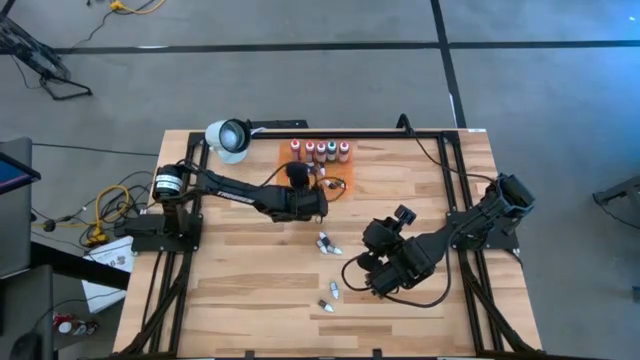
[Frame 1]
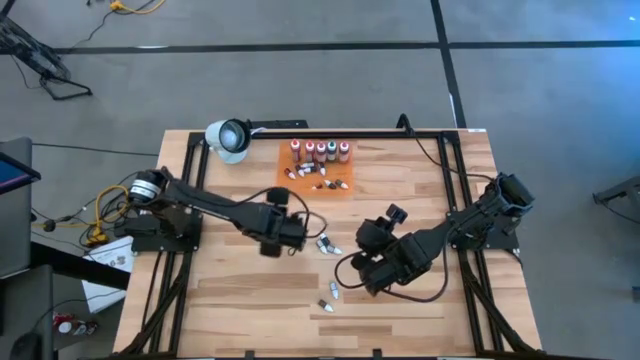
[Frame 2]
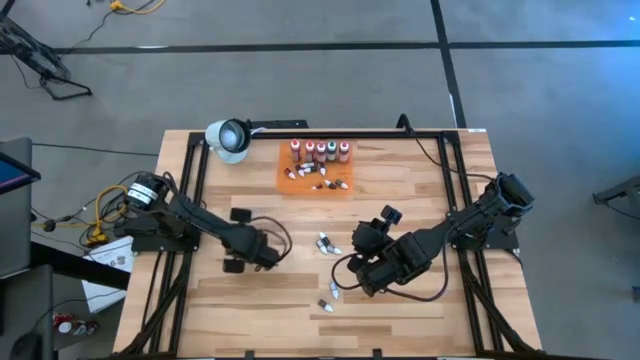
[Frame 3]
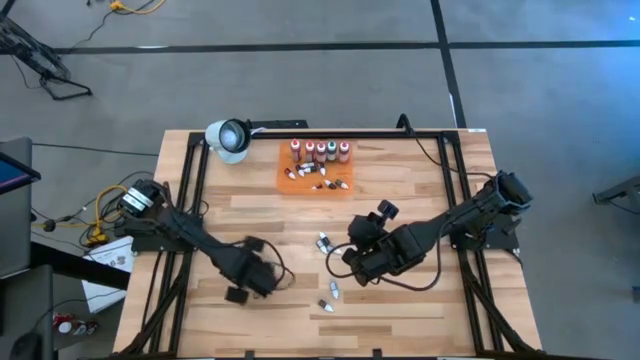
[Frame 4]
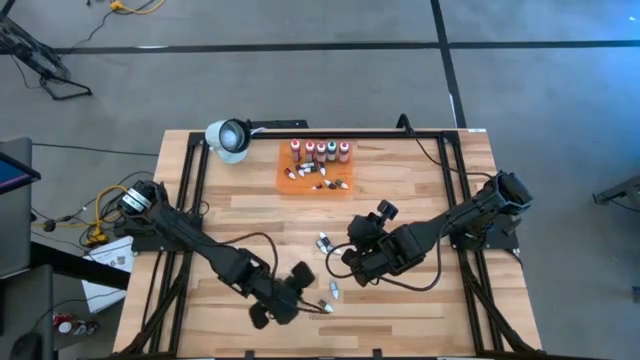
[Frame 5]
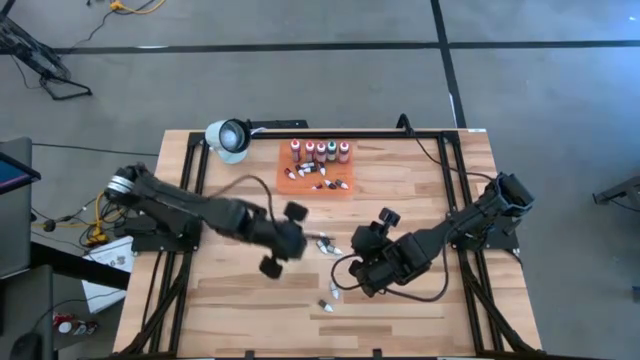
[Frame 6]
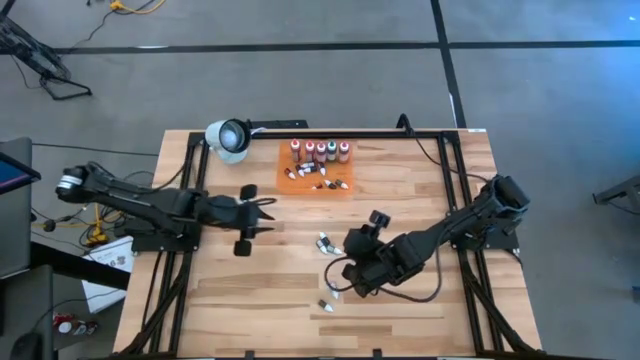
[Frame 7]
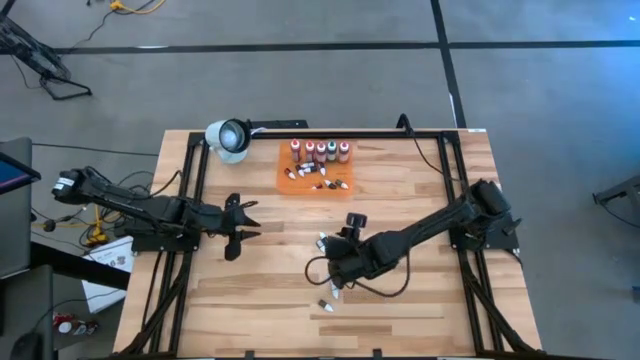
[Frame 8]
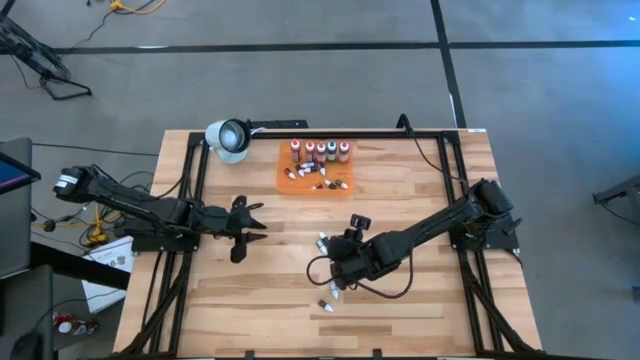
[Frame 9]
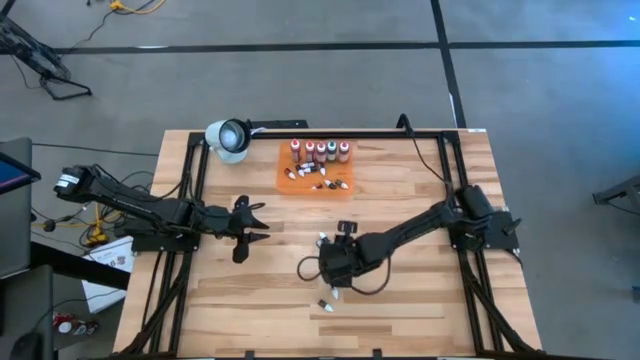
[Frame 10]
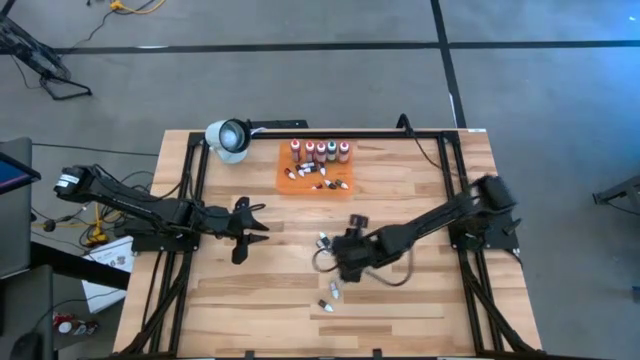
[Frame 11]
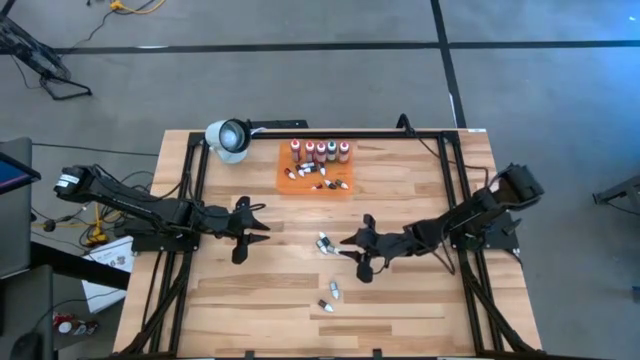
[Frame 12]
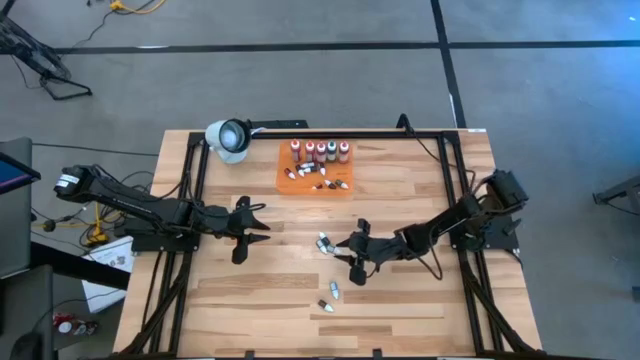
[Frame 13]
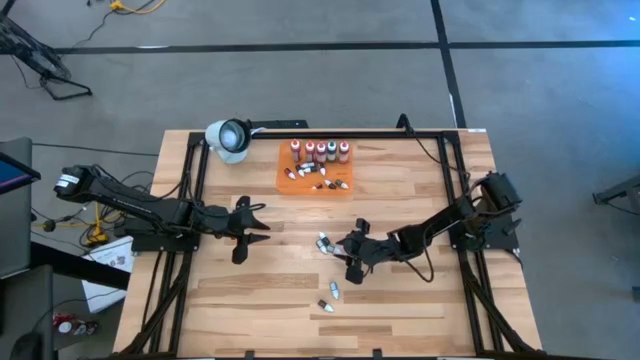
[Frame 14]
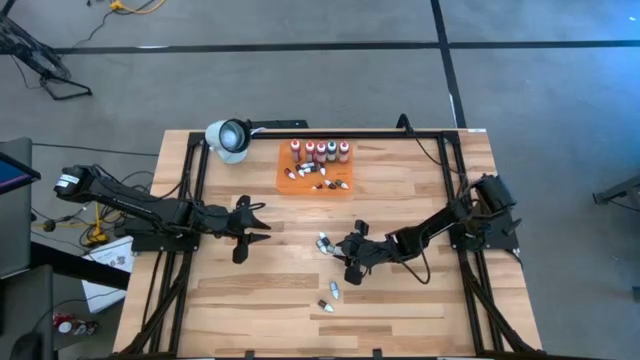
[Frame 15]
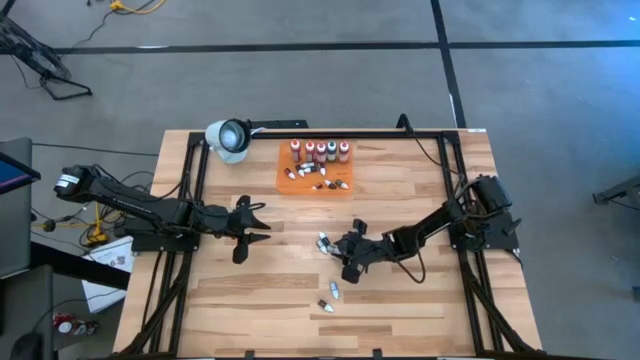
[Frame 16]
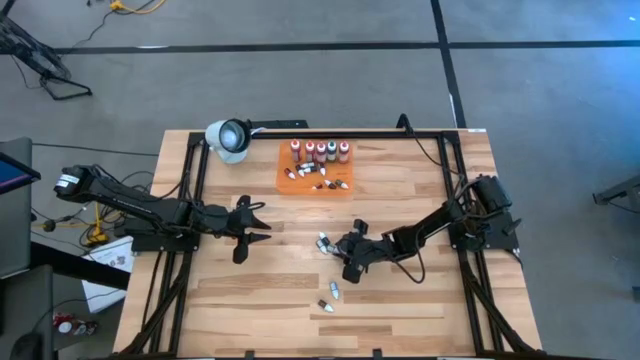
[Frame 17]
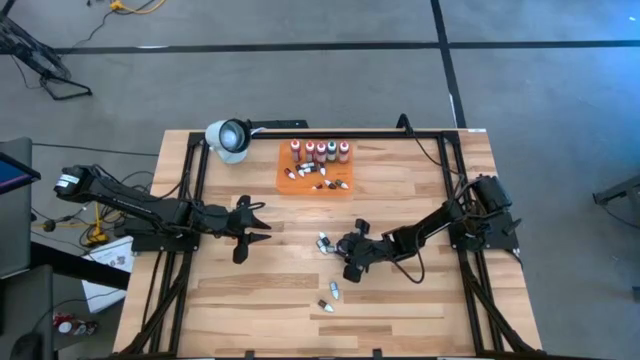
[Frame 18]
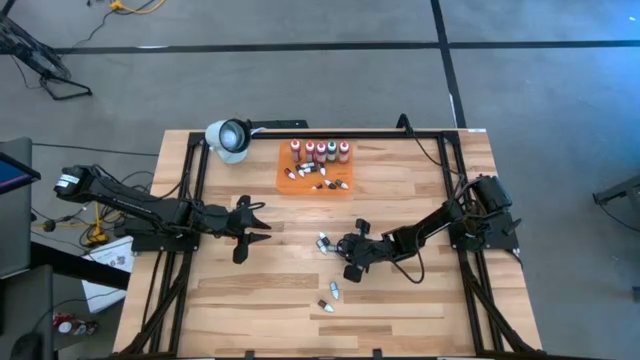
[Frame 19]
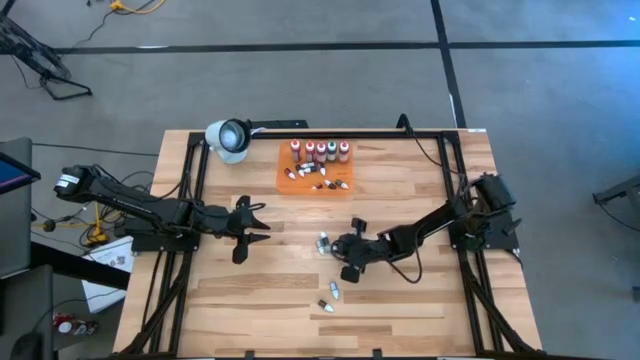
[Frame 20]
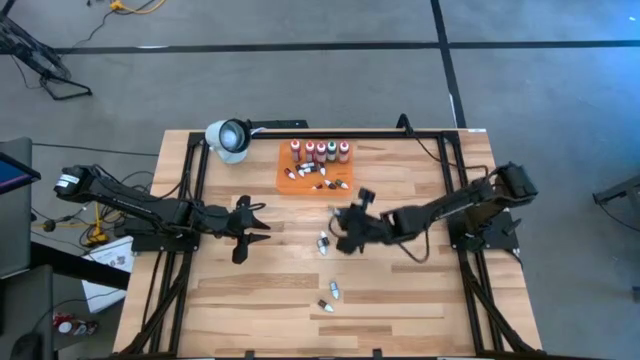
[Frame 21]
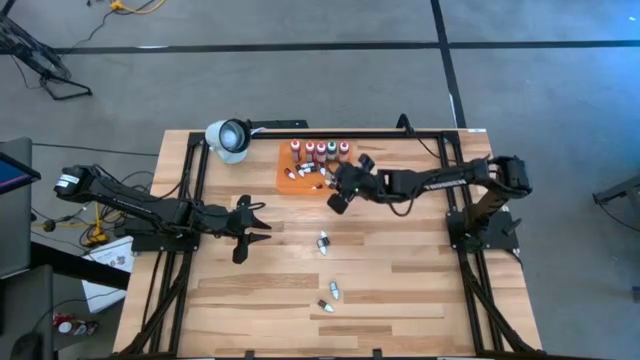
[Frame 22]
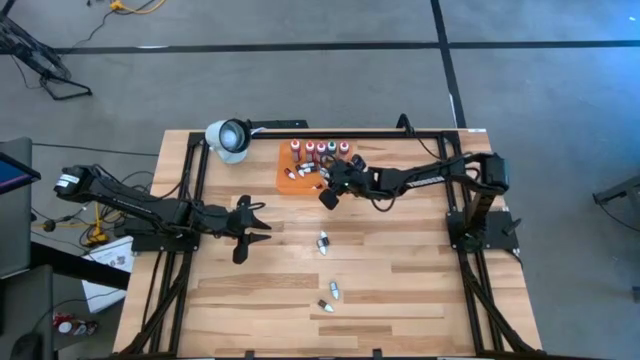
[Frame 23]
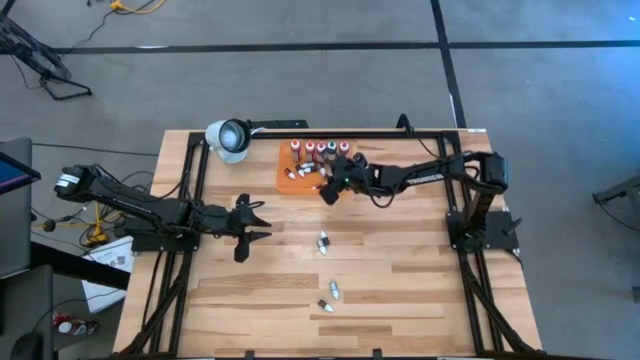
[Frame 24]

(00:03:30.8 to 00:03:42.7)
Task: Pick & Place food coloring
Put the small green food coloring bottle into the orange bin

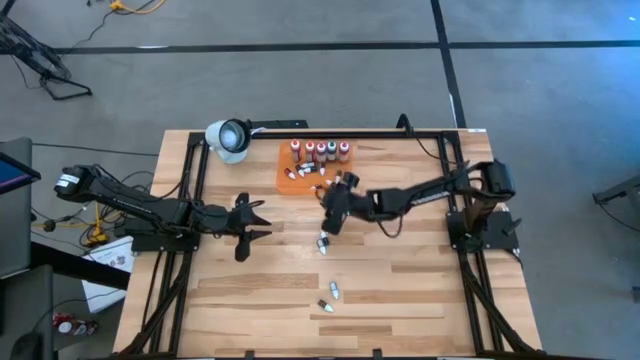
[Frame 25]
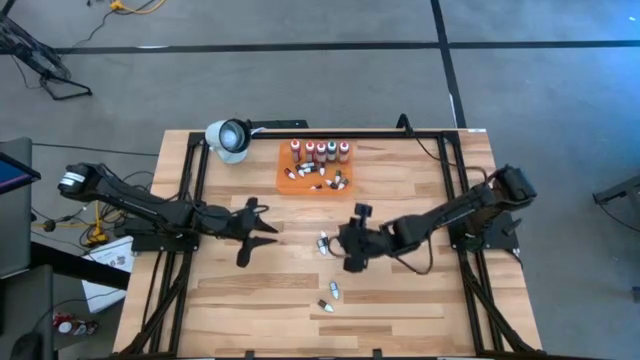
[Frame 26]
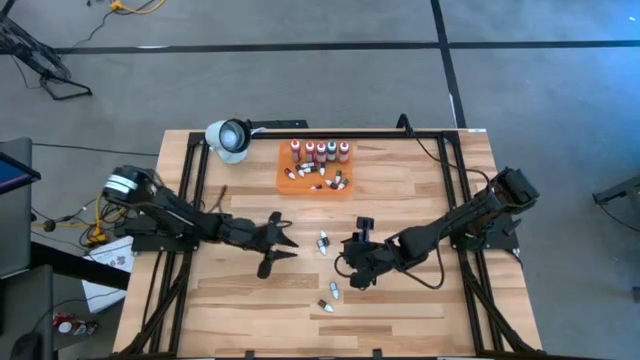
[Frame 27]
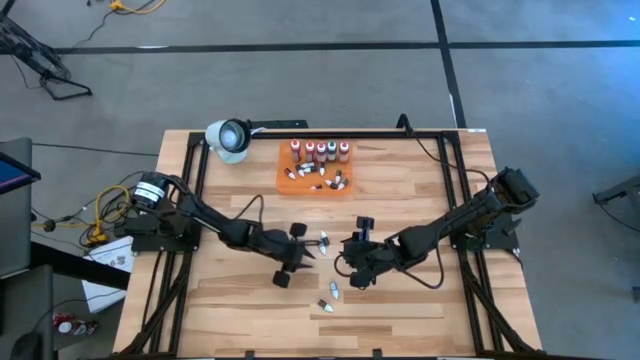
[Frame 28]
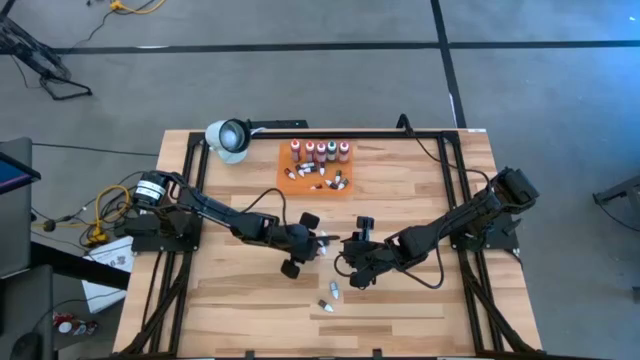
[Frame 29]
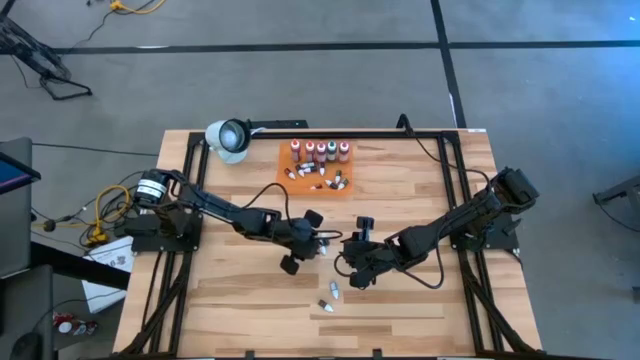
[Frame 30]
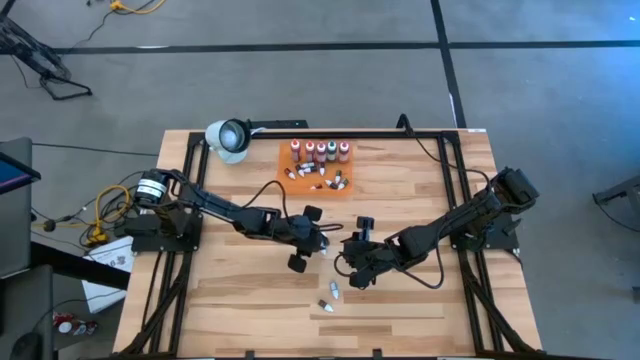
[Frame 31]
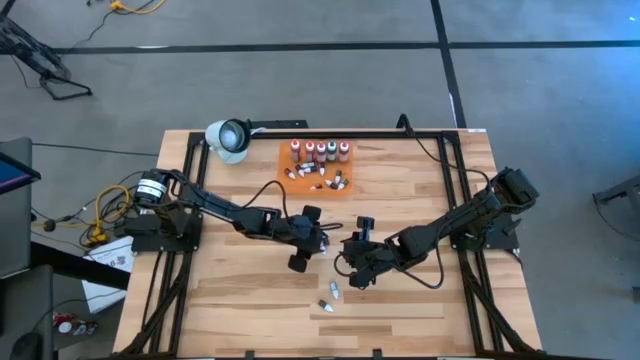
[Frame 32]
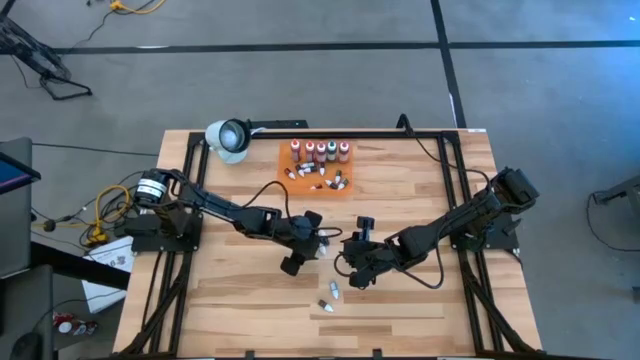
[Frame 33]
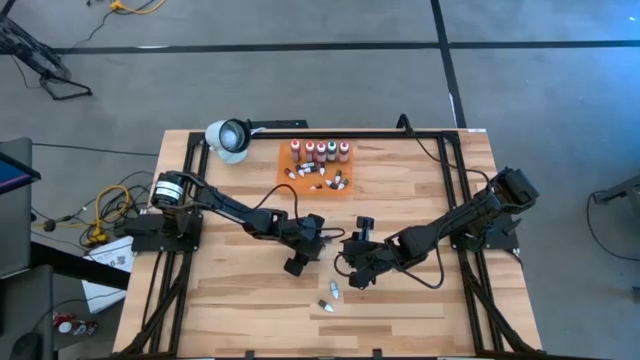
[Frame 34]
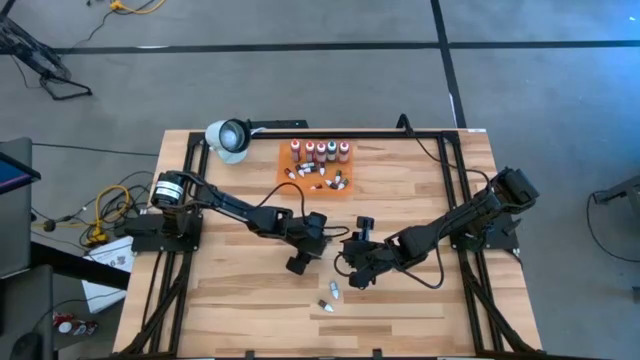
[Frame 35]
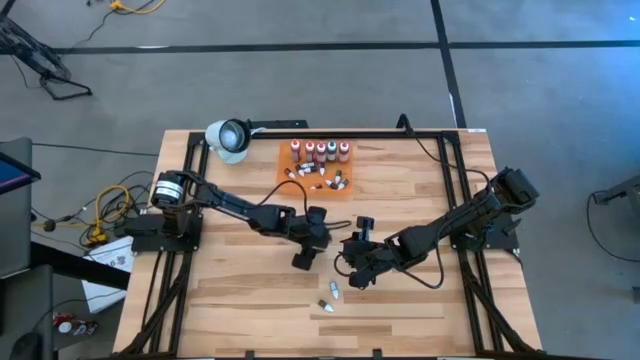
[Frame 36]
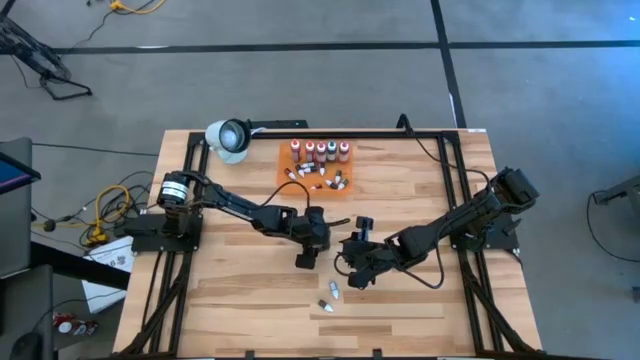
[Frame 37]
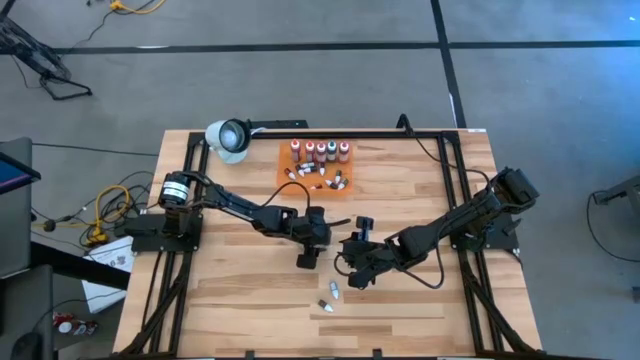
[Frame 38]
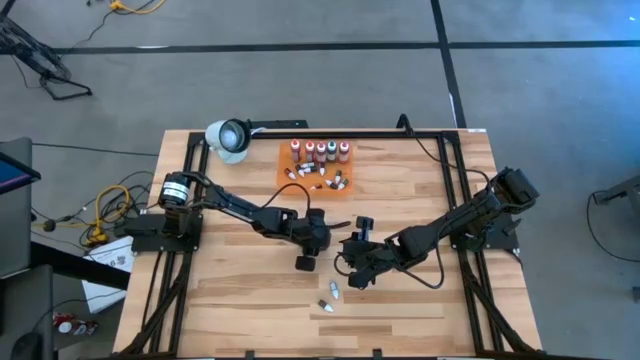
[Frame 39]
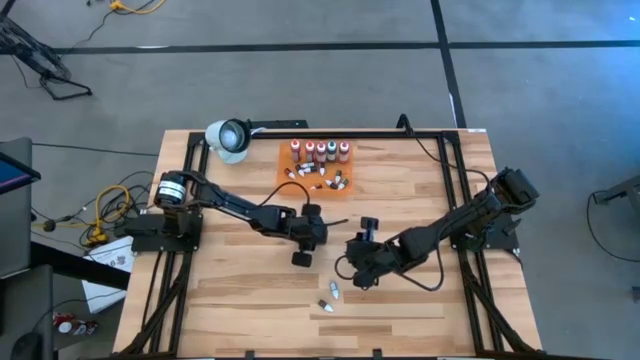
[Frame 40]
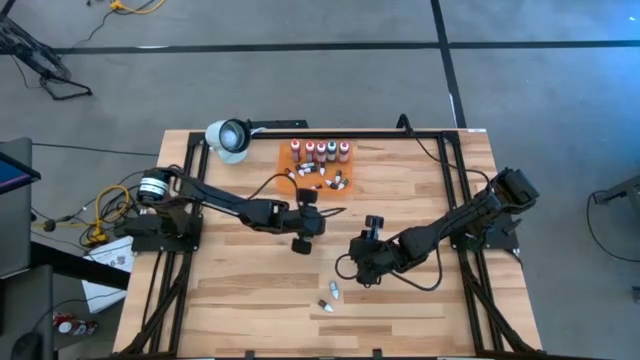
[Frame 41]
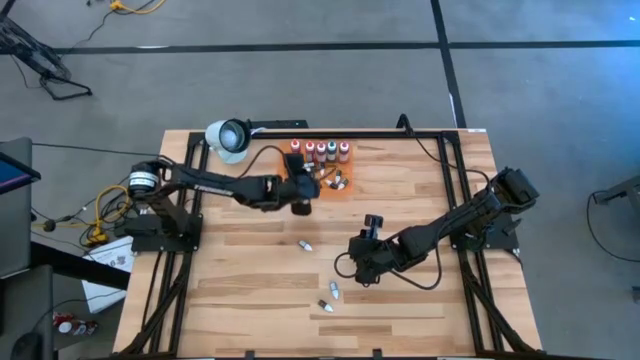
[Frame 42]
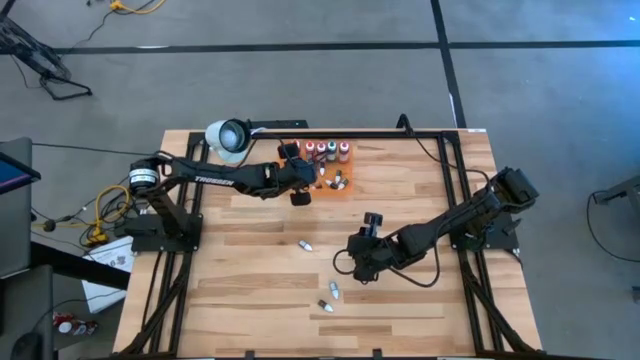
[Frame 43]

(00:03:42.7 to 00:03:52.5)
Put the small green food coloring bottle into the orange bin
